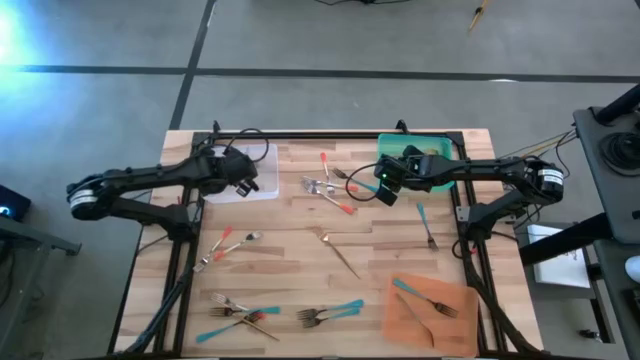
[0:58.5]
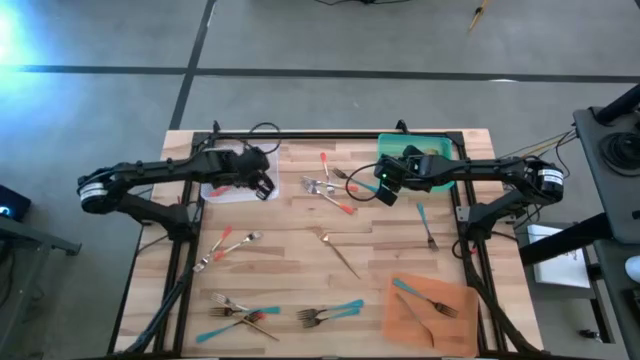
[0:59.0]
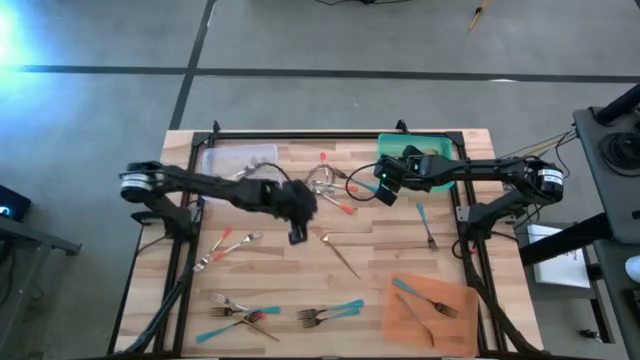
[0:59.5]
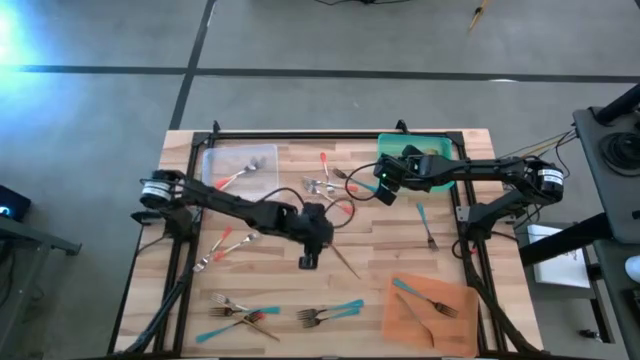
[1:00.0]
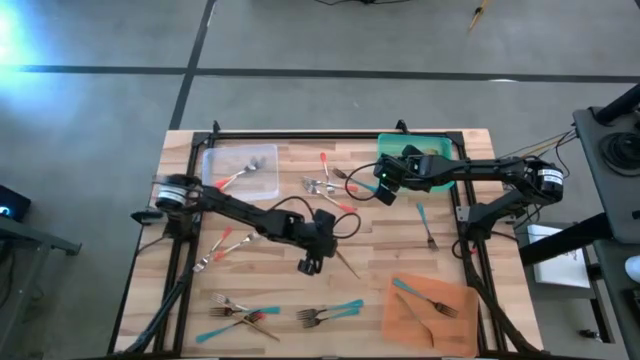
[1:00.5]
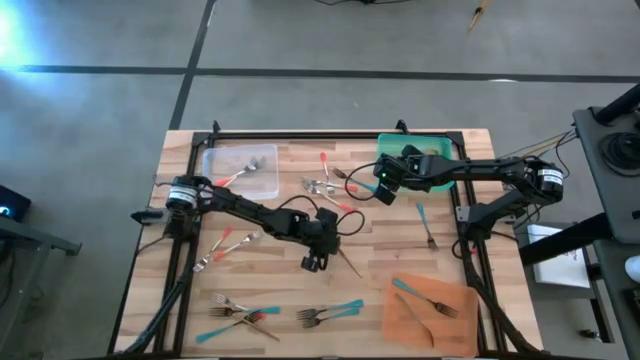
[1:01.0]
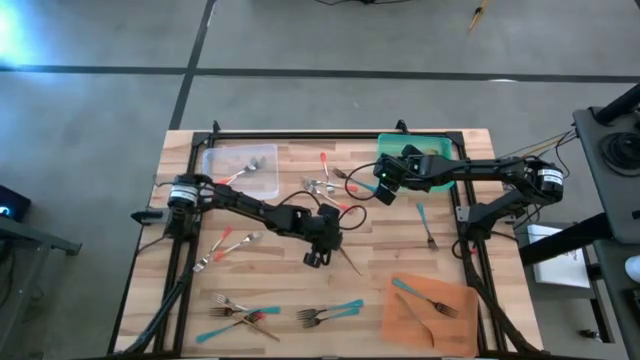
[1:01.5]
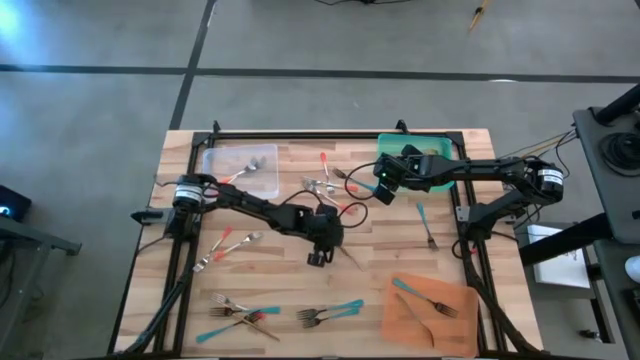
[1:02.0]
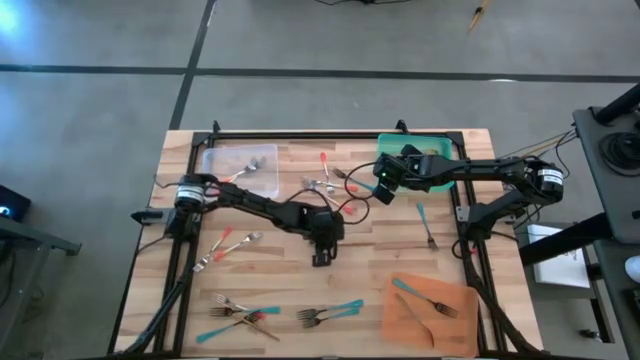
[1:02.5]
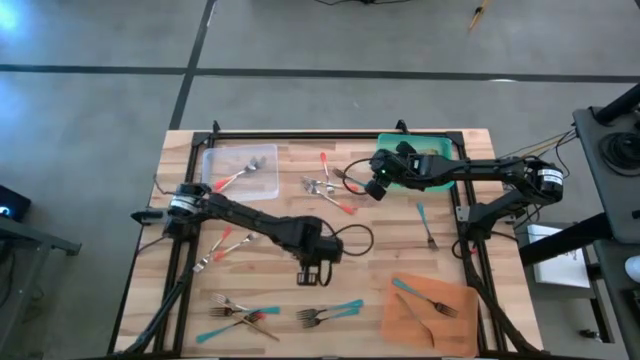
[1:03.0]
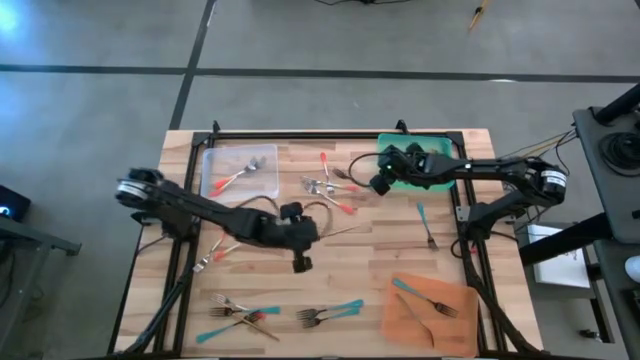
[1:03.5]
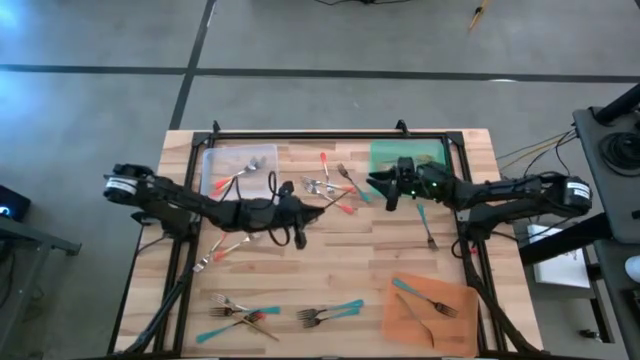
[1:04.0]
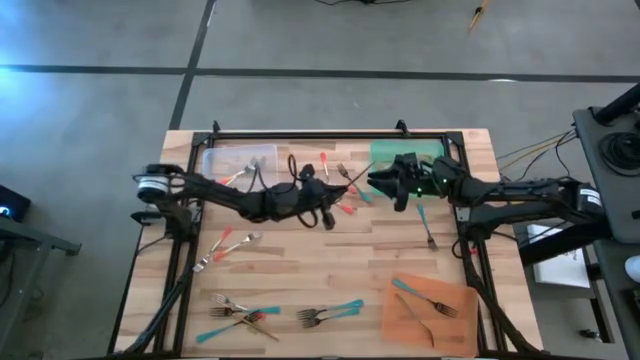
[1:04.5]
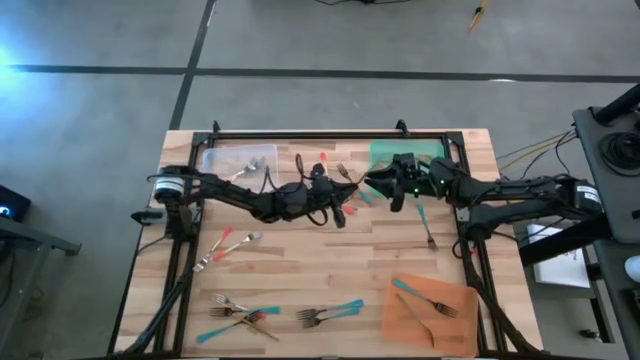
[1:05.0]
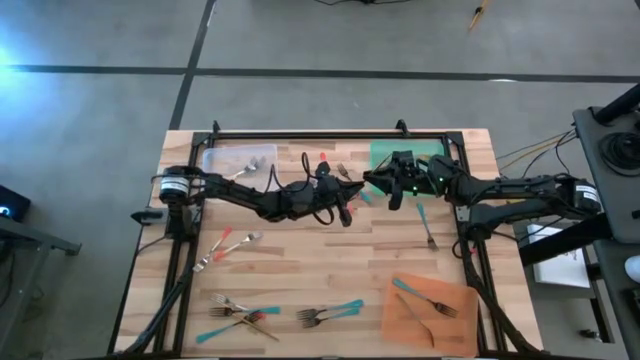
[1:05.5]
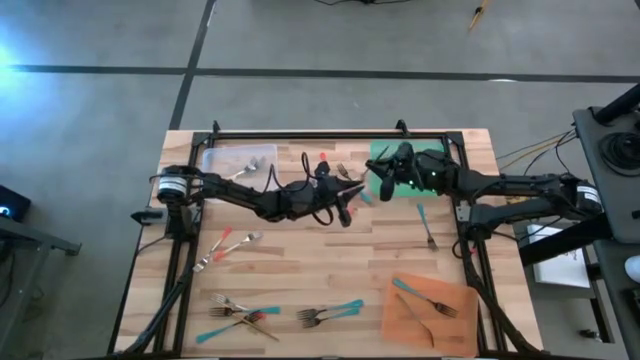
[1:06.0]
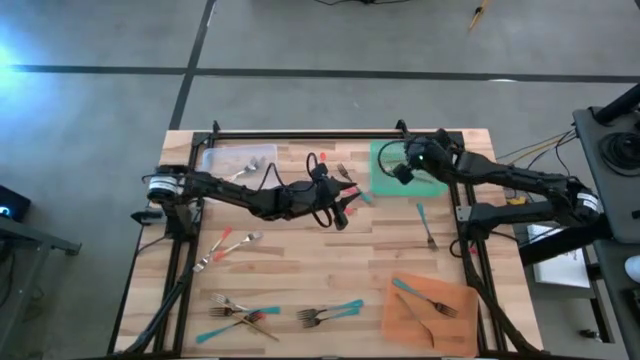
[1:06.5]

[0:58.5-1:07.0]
Task: Sort silverware by color (type)
Put the golden fork into the green bin

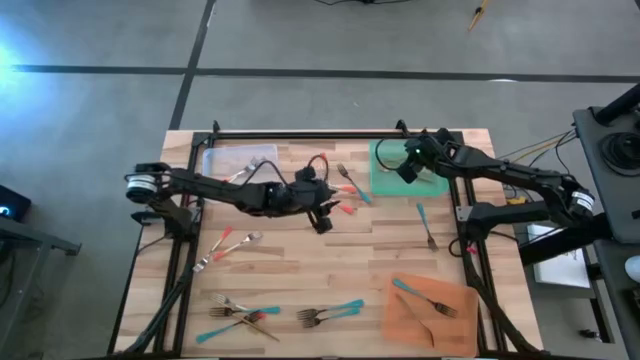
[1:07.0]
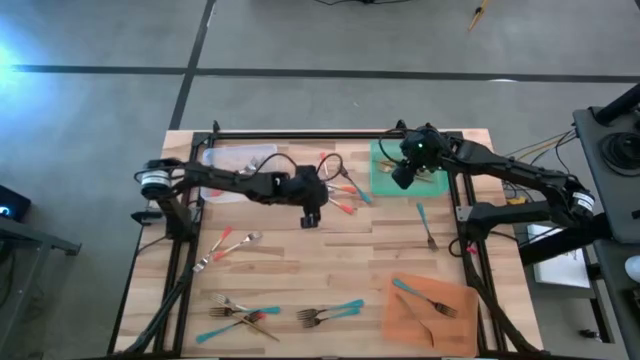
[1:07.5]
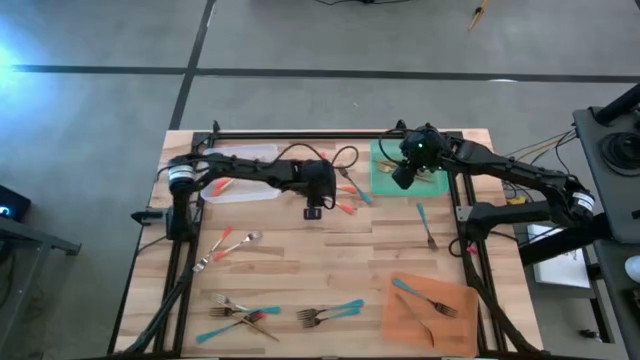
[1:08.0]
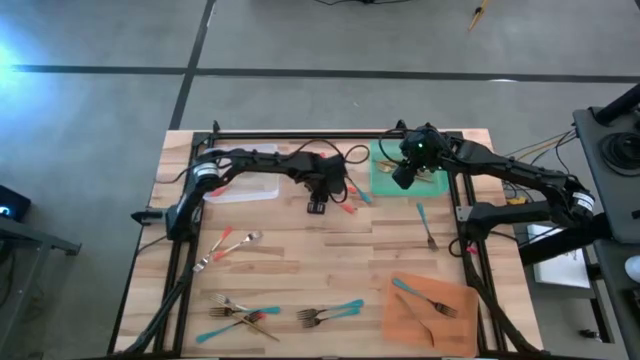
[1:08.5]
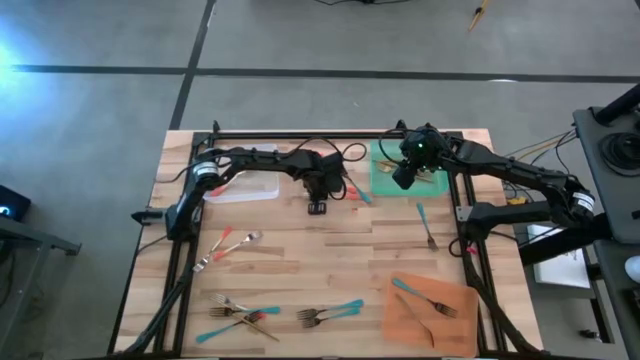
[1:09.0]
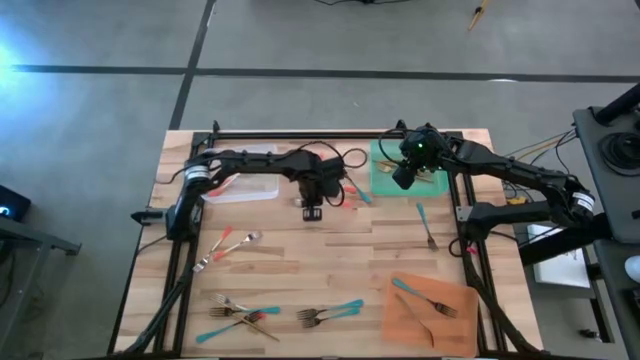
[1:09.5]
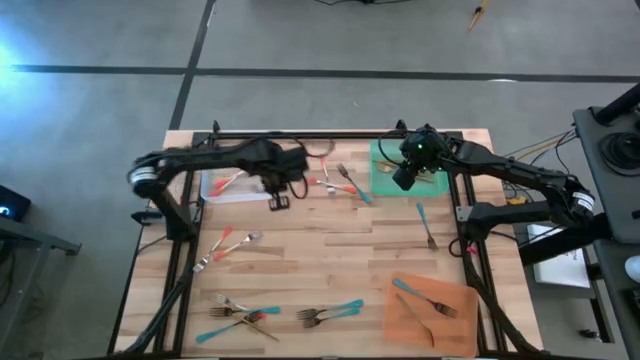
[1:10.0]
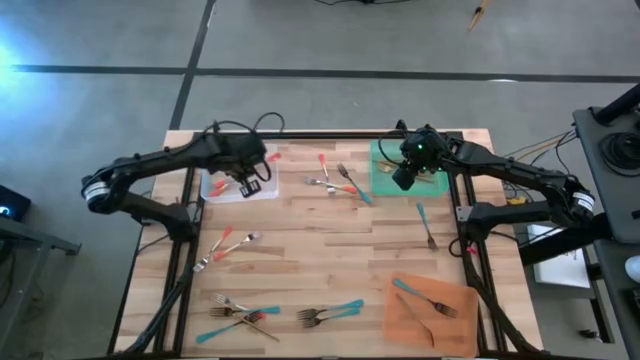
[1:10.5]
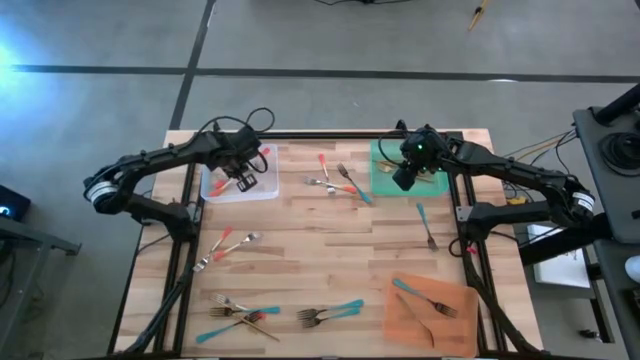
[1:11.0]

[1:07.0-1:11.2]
Put the orange fork into the white bin

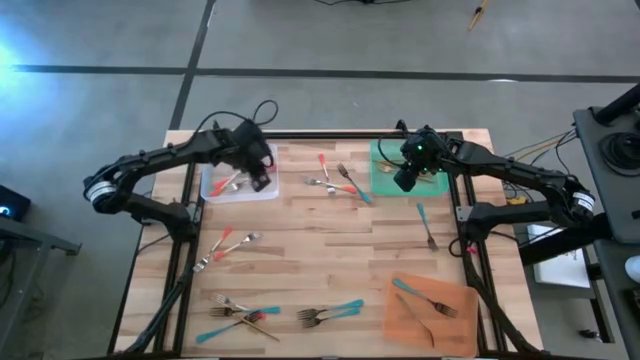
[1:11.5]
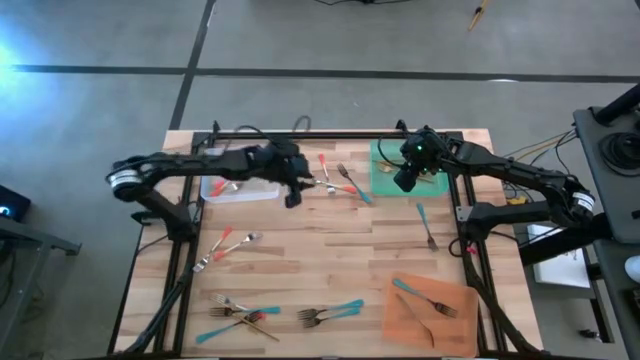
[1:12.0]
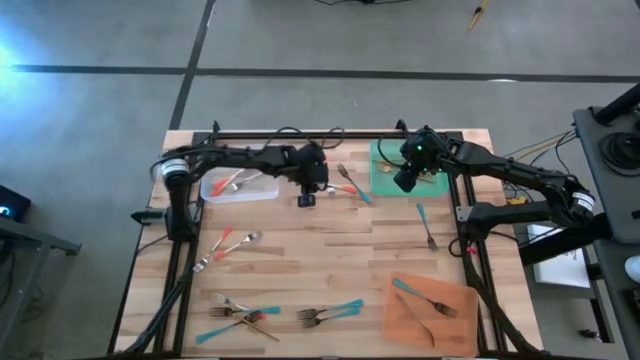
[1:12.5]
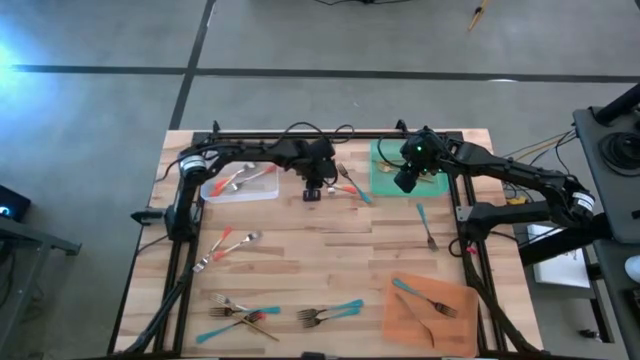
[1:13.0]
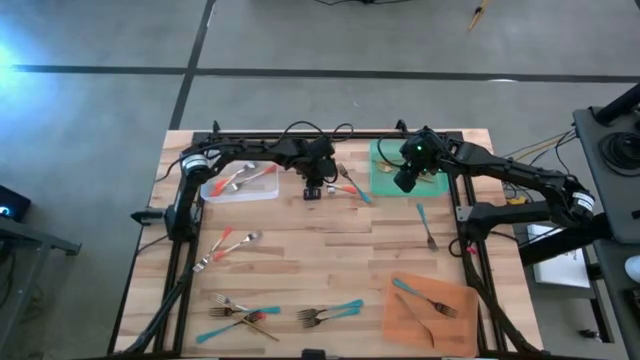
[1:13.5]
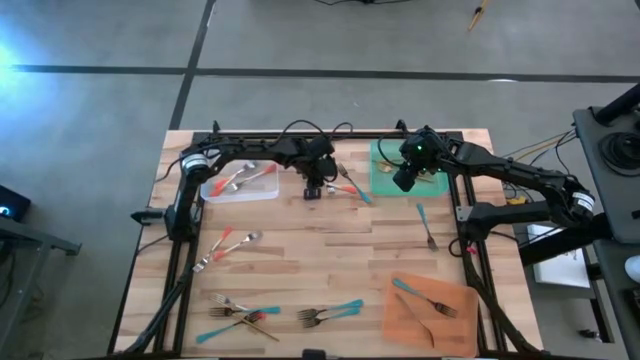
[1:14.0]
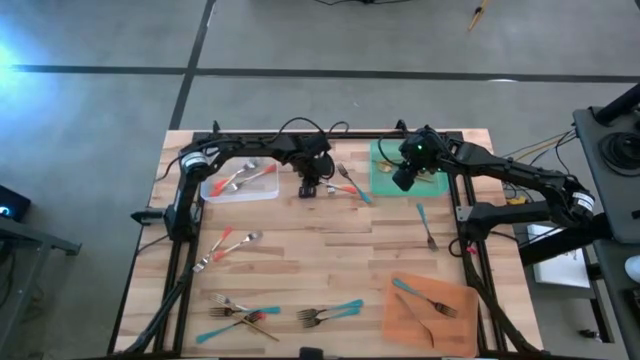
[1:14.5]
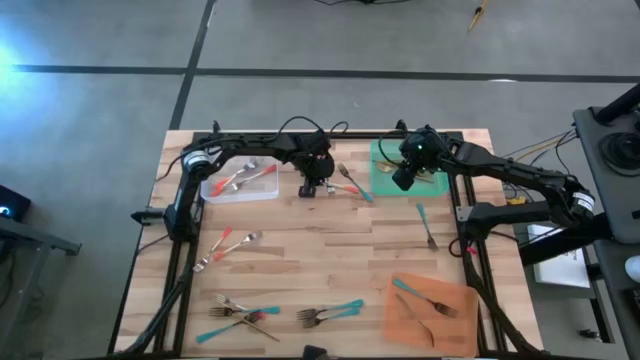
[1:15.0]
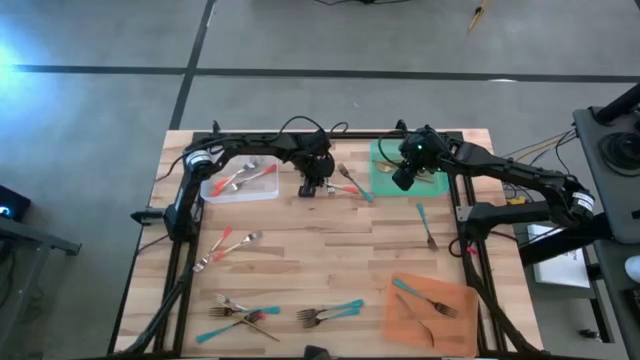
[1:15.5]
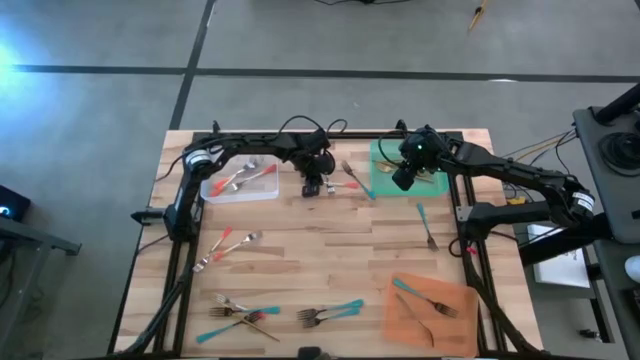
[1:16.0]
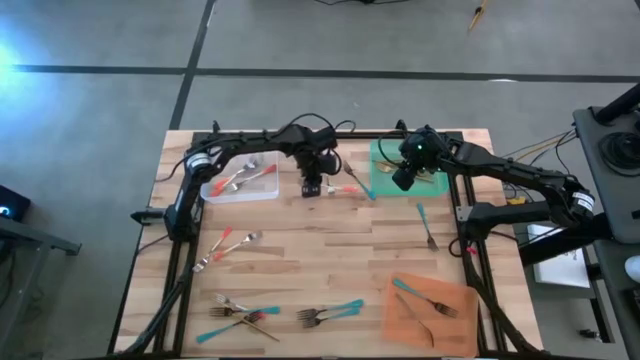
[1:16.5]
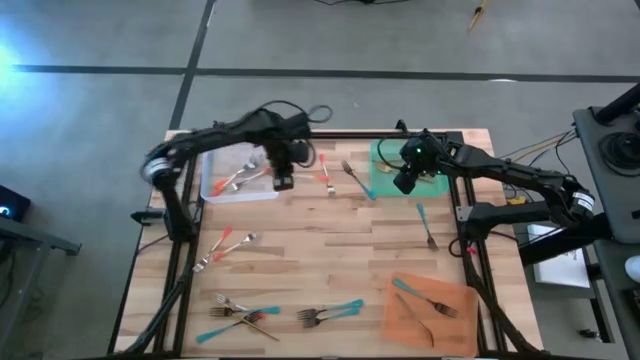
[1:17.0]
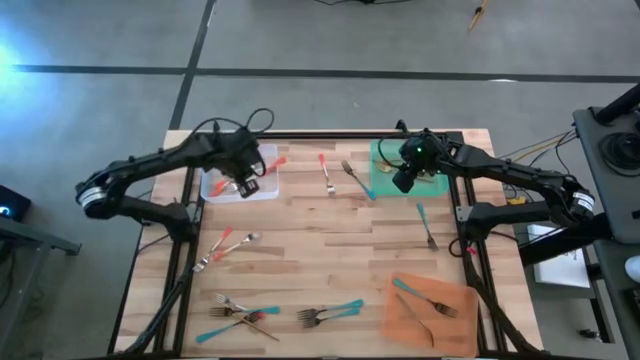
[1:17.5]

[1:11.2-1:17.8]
Put the orange fork into the white bin

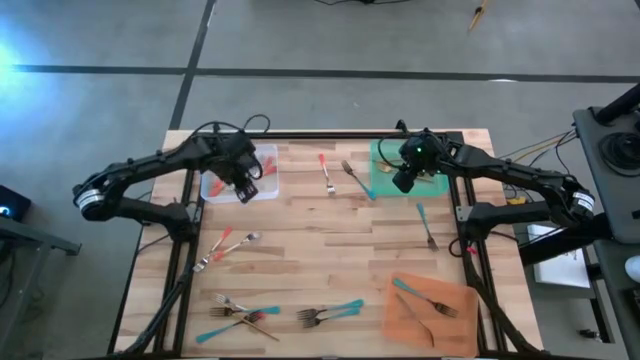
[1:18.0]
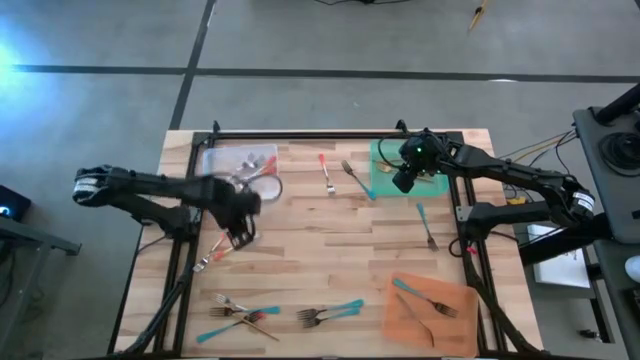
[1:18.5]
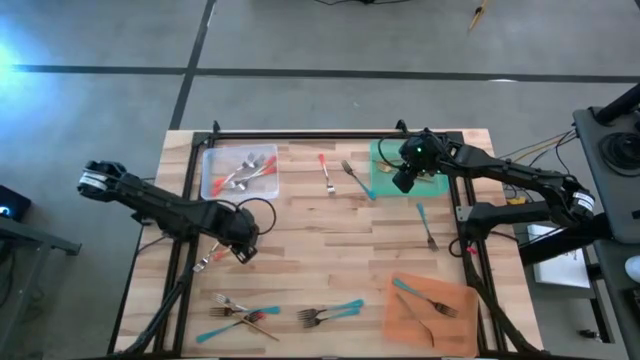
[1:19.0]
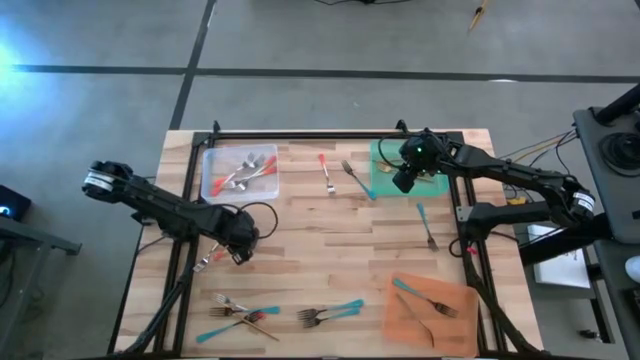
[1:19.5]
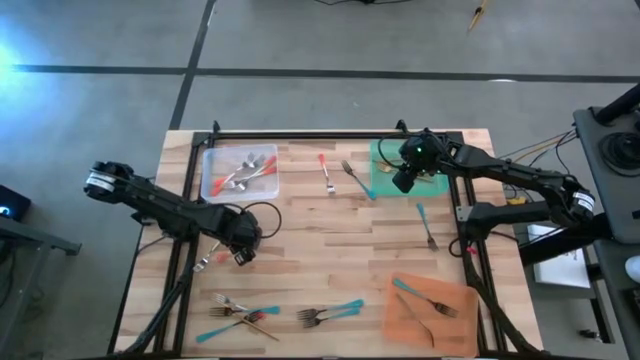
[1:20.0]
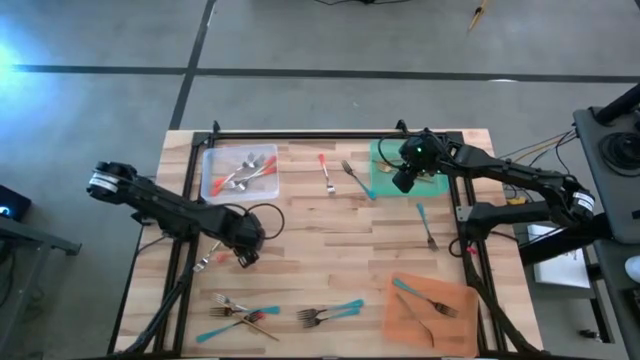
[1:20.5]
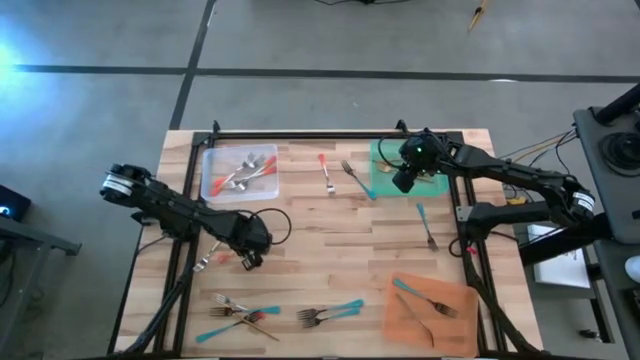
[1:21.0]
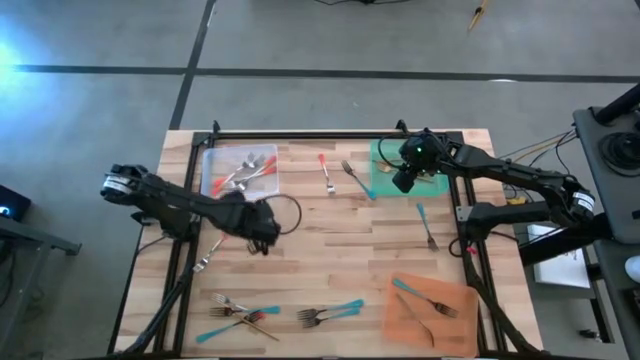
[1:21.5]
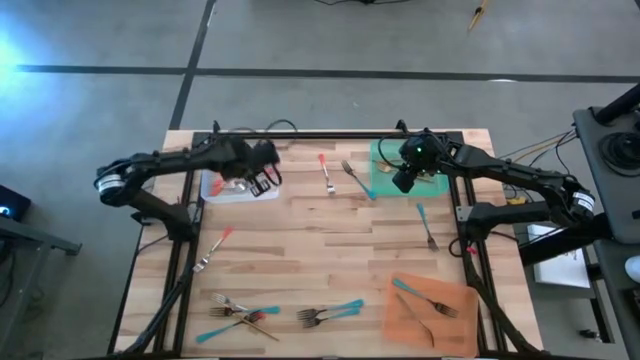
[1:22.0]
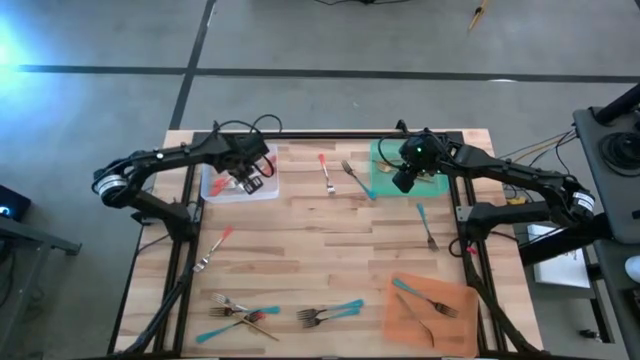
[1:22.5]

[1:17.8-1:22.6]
Put the orange fork into the white bin
